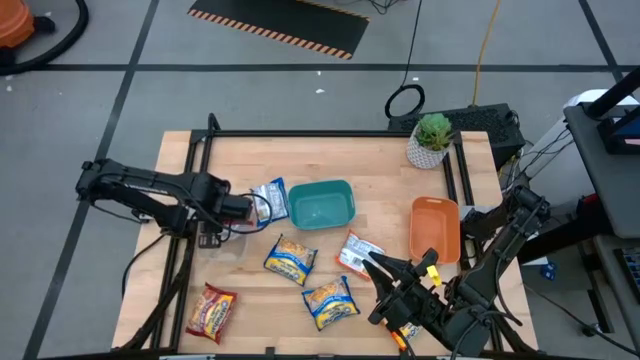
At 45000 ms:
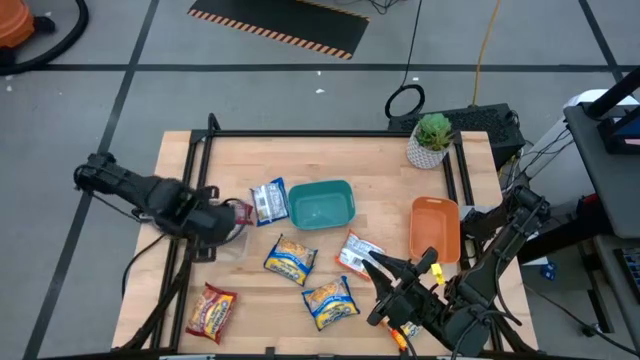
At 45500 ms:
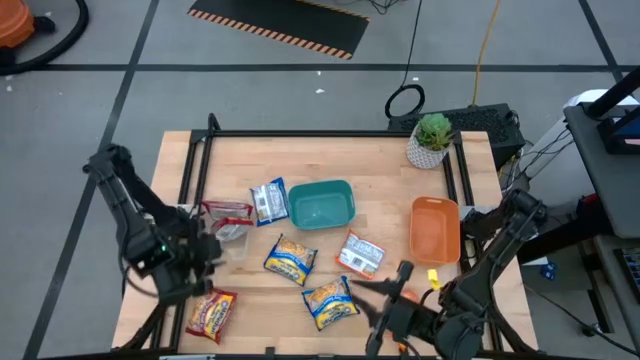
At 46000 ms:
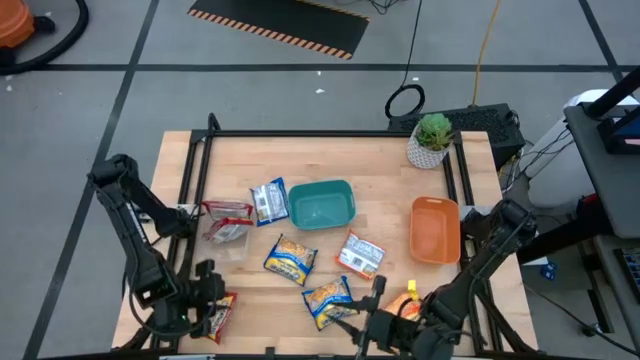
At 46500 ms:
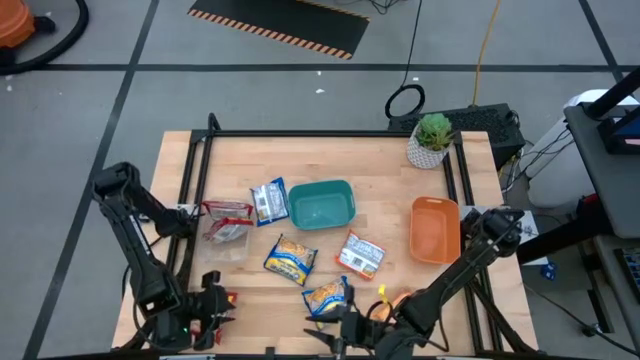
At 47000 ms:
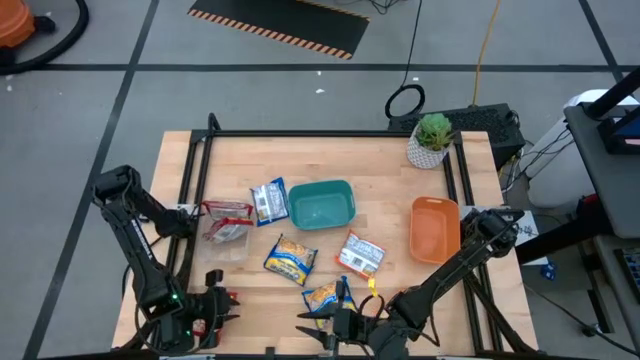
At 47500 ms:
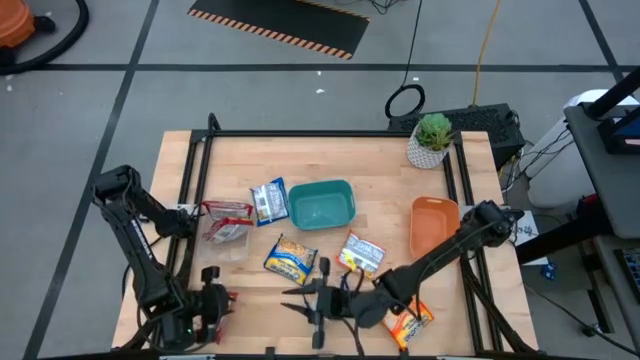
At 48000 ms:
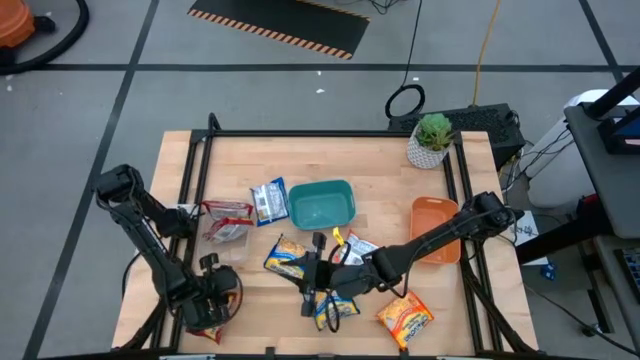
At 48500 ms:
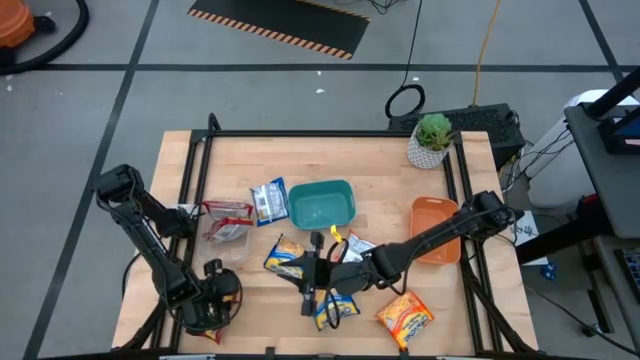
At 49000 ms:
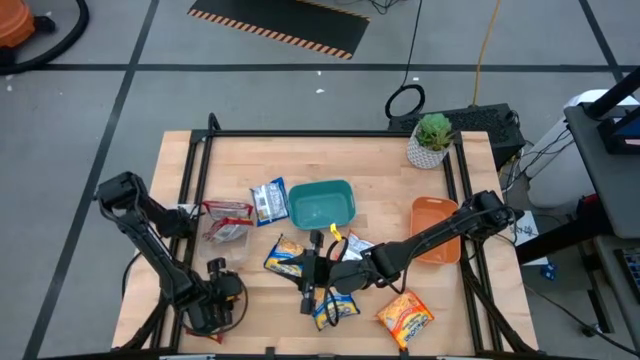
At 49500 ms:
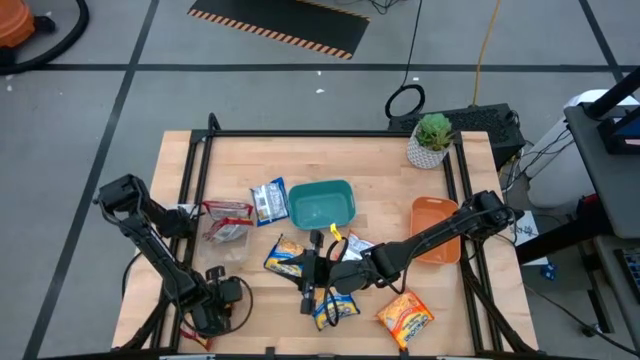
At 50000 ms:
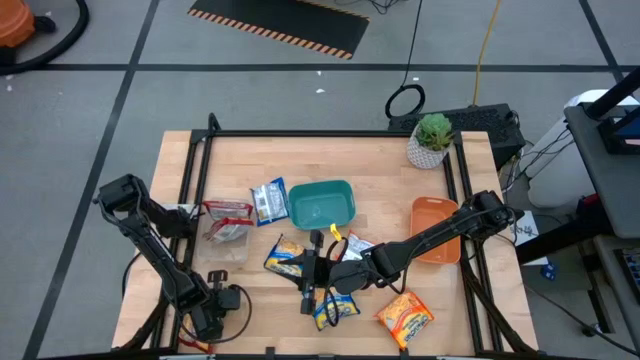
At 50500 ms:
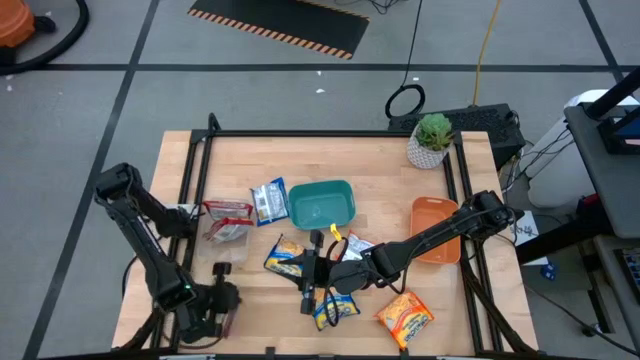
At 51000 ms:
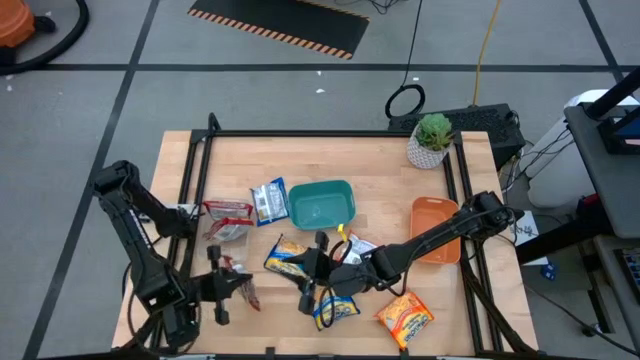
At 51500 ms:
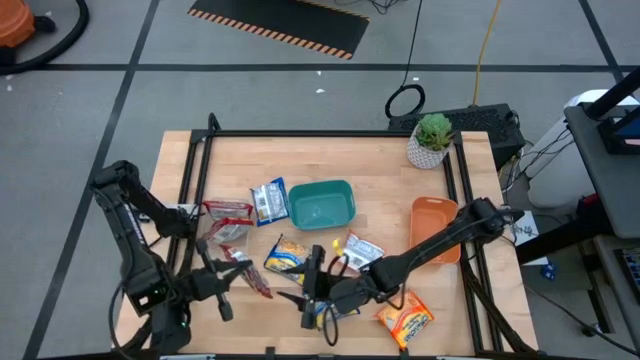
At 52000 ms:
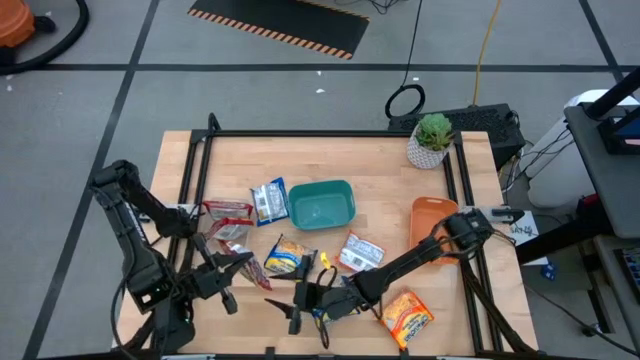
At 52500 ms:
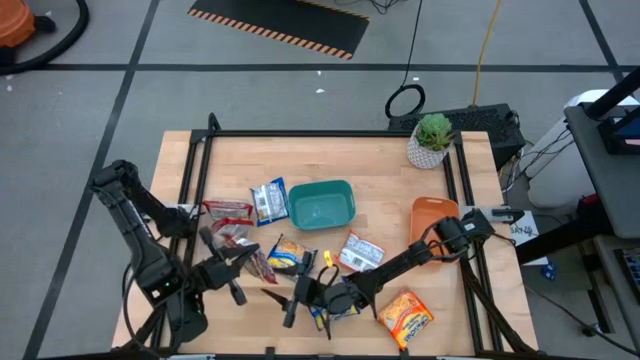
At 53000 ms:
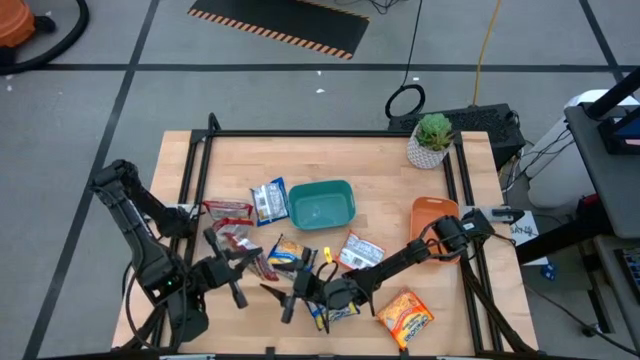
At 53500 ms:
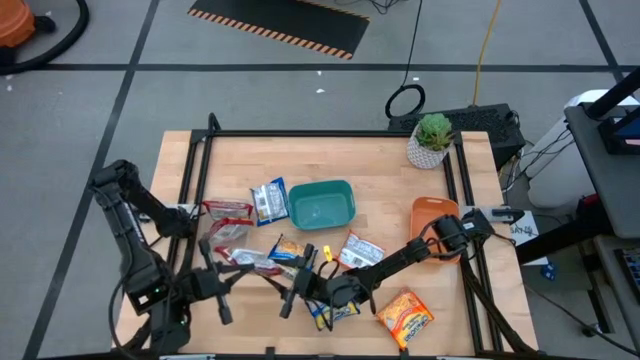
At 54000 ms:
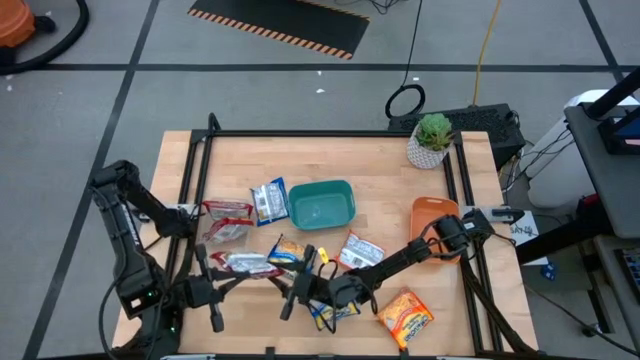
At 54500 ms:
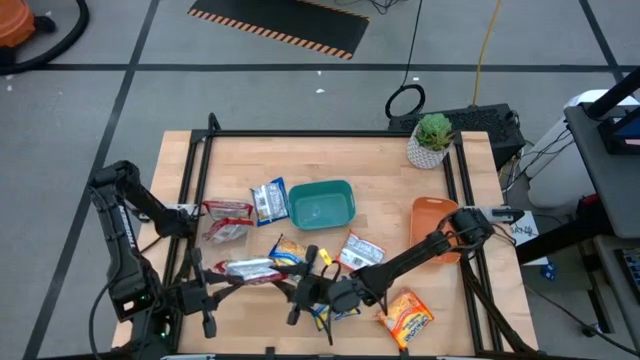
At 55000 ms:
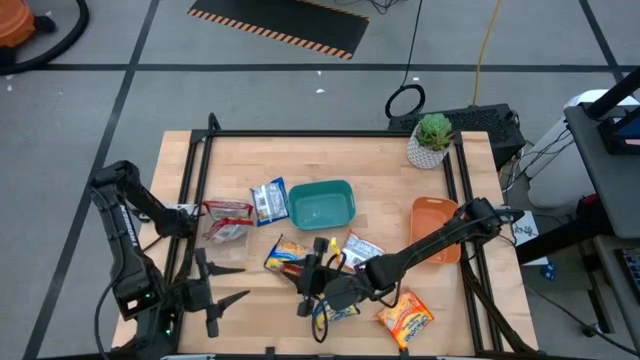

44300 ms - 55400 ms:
Task: Sort Maruchan noodles
Put the red noodle pack into the transparent bin

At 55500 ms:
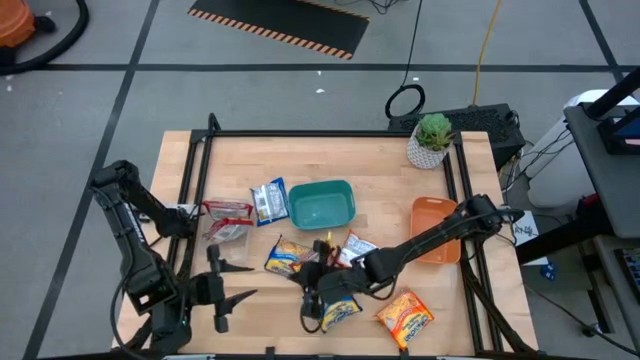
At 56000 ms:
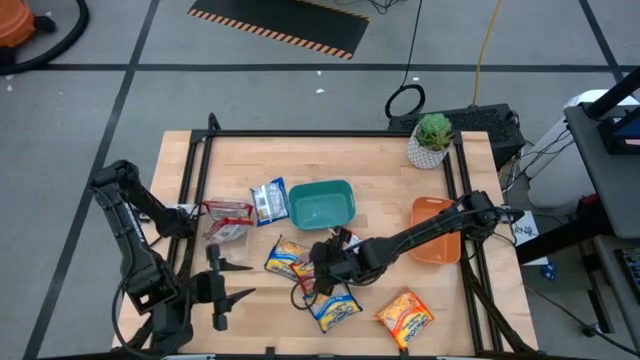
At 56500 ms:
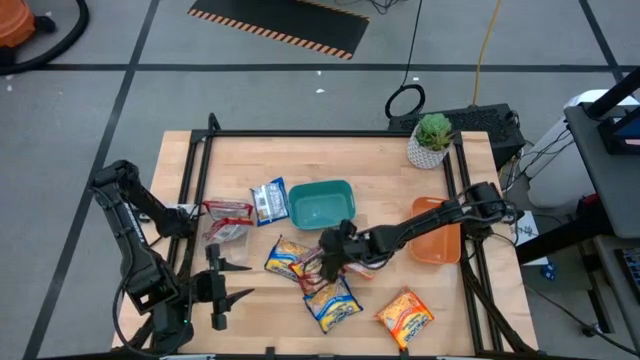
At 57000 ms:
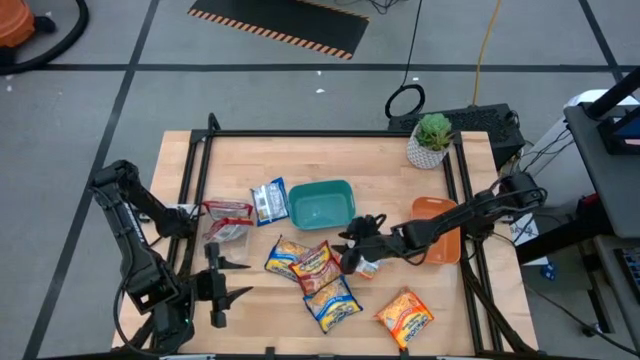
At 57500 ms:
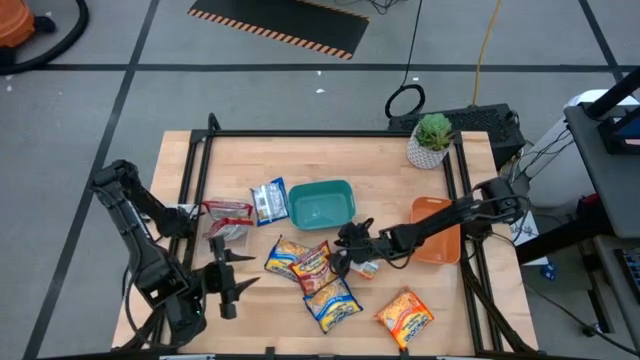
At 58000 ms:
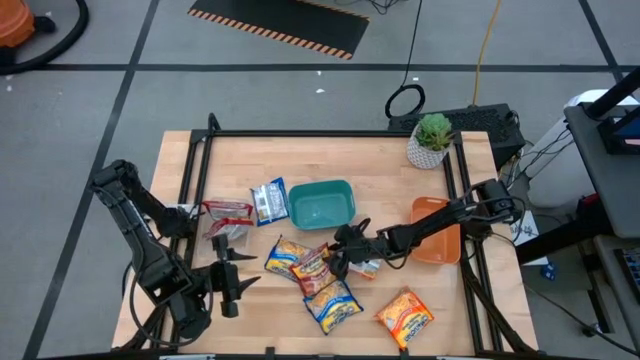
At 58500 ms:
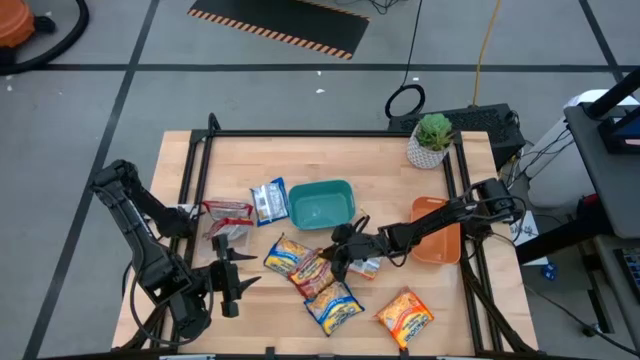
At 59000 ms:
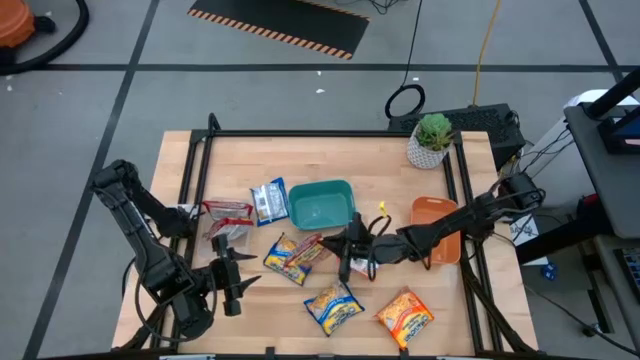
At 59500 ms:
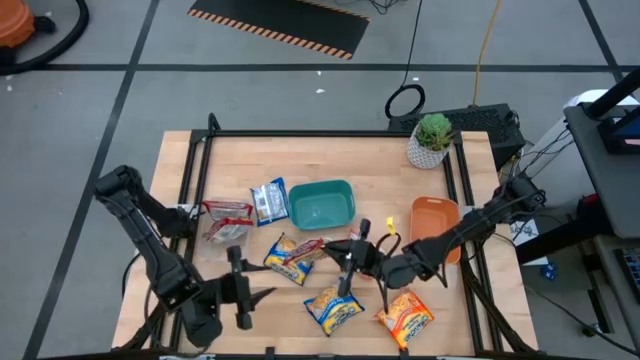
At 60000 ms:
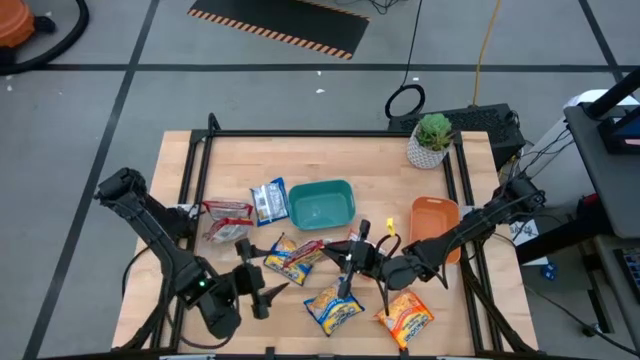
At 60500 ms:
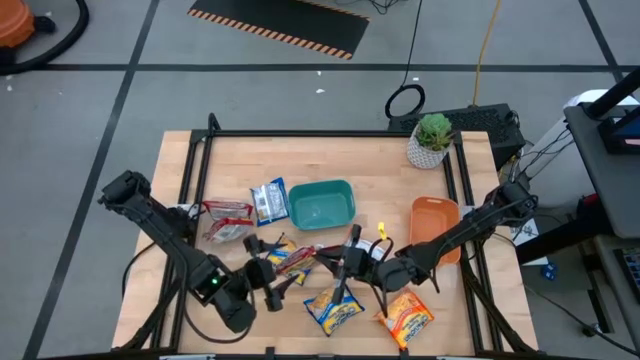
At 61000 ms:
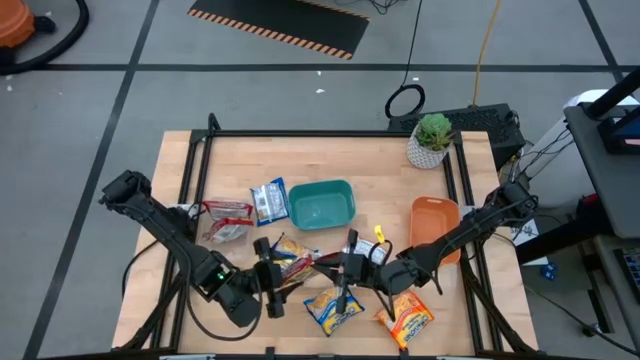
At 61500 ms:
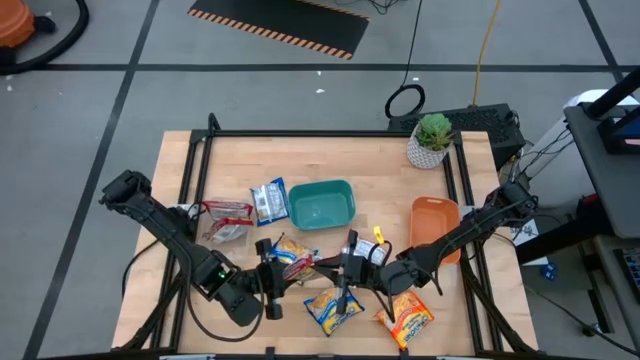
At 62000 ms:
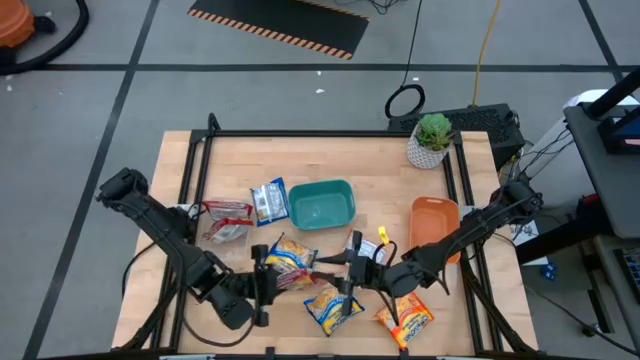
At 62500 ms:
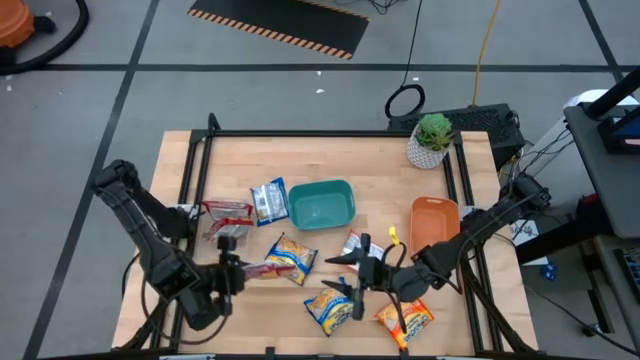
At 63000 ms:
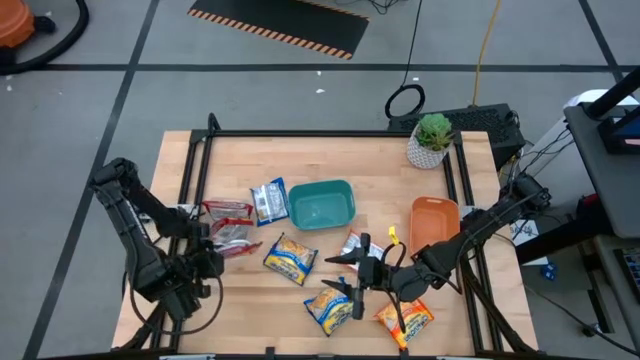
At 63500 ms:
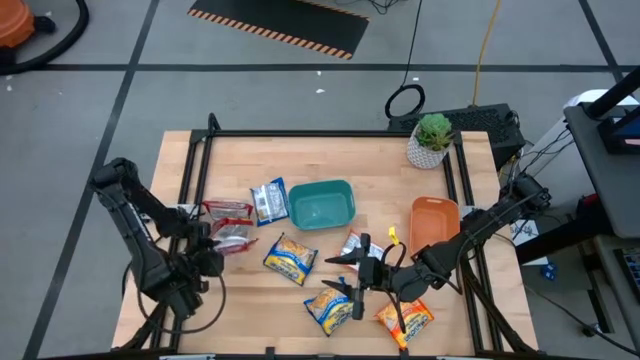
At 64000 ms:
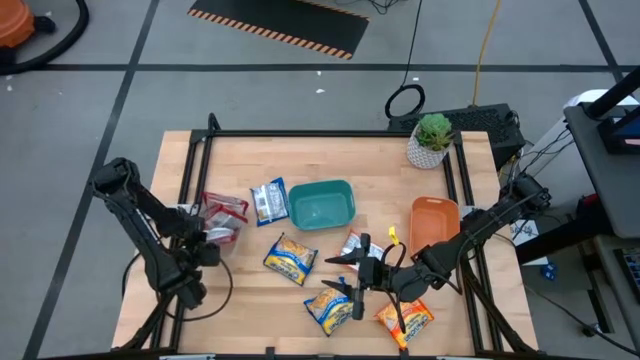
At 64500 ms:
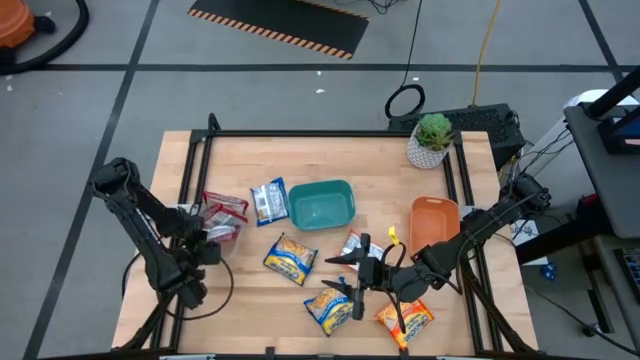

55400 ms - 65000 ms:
Put the red noodle pack into the transparent bin
